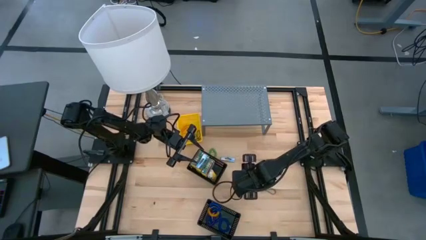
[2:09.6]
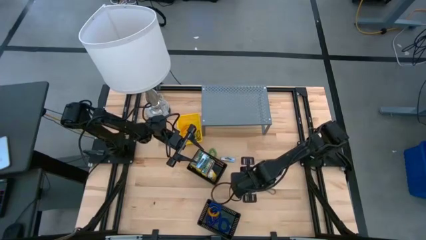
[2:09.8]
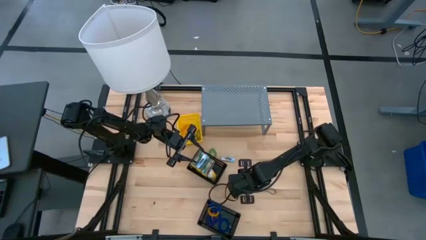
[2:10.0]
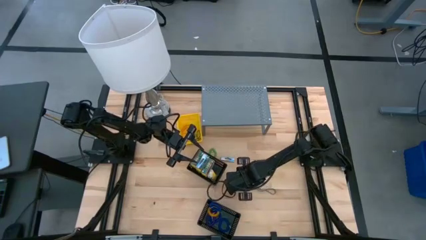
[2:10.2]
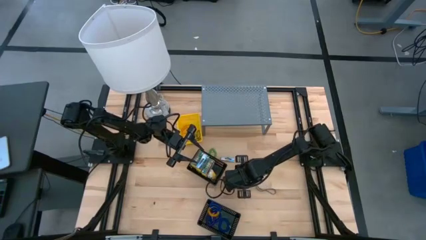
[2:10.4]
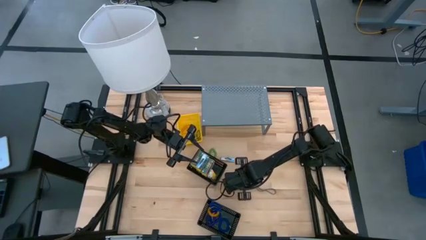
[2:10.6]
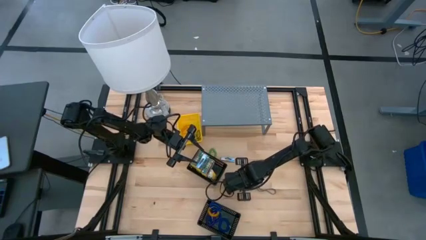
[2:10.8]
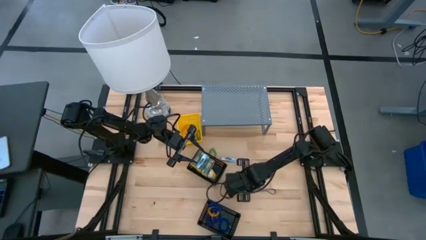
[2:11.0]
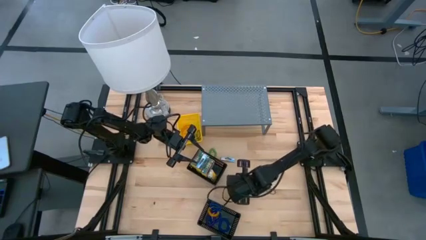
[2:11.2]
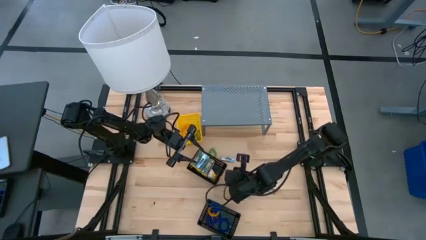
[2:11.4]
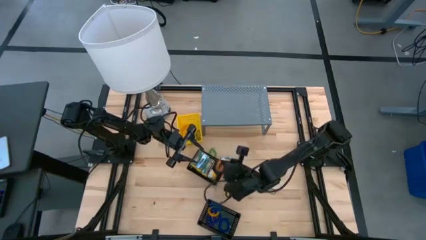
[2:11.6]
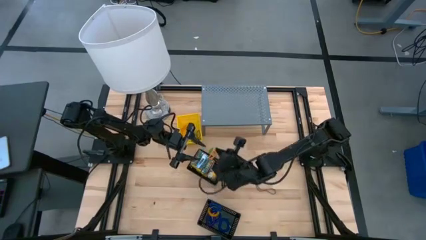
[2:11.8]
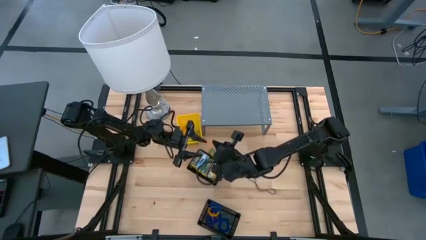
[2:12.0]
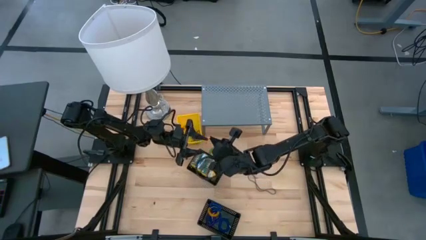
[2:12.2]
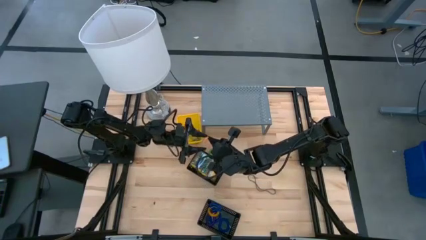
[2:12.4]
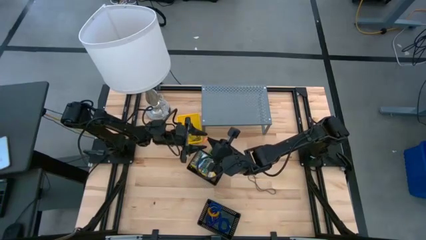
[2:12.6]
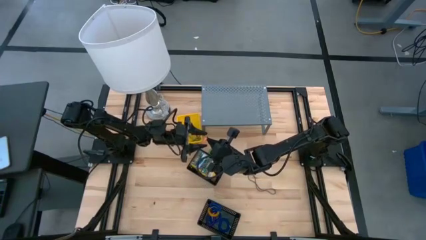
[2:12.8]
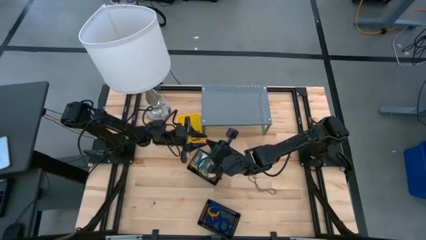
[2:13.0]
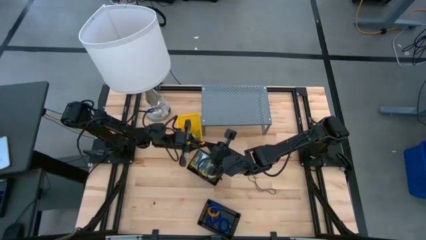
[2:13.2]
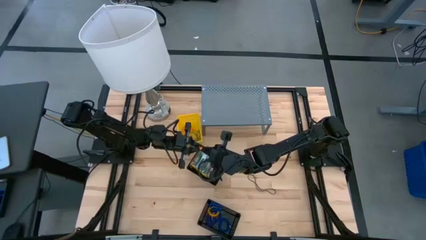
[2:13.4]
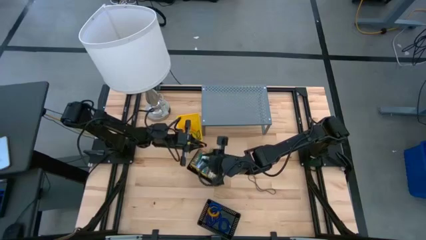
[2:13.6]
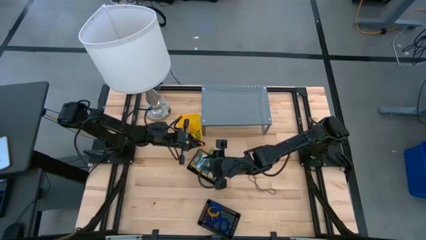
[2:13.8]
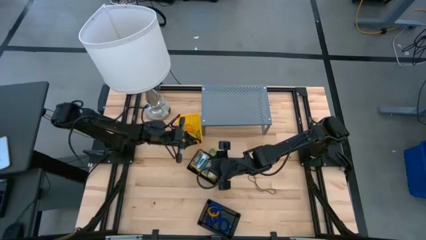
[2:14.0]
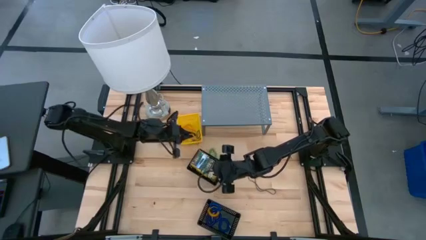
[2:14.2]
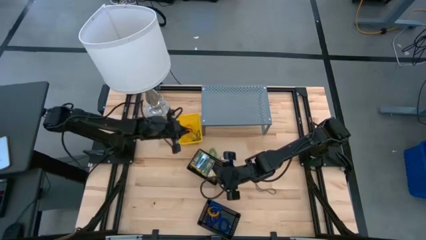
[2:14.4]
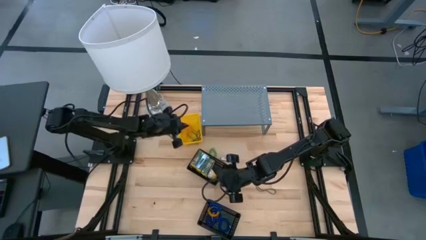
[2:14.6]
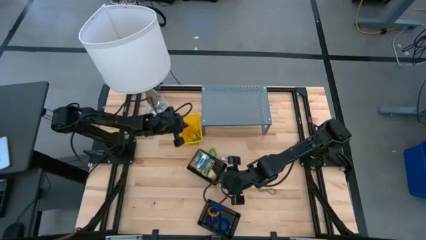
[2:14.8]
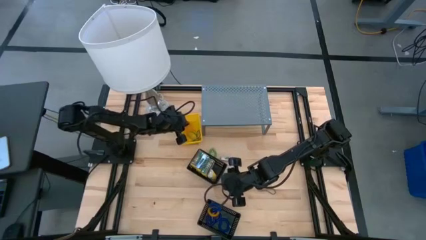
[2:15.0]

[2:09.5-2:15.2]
Task: Pick & Place Office Desk Supplies
Put the orange rubber band into the yellow bin

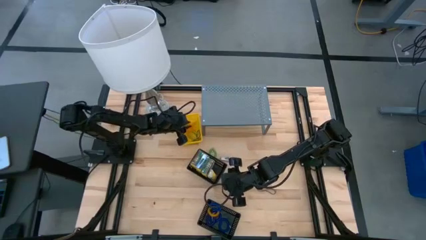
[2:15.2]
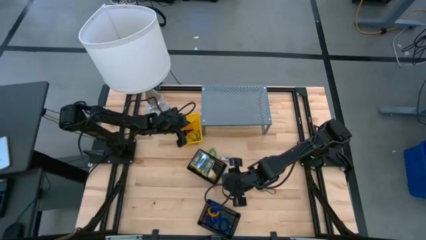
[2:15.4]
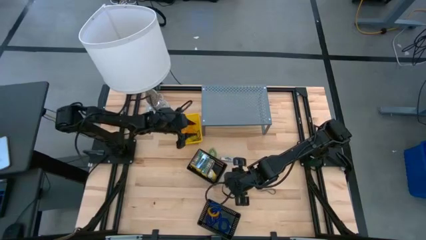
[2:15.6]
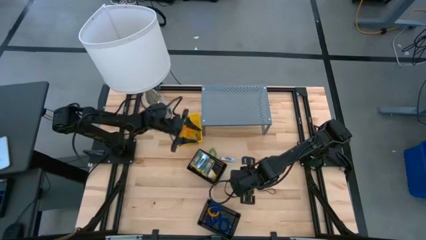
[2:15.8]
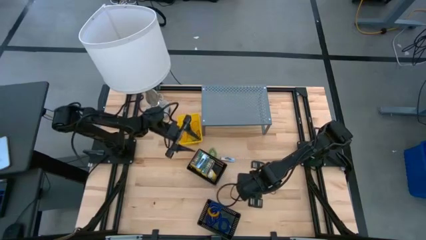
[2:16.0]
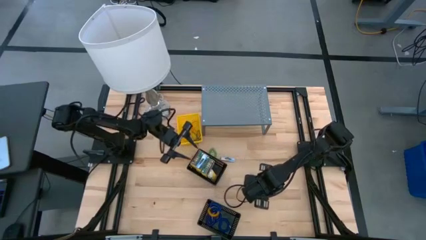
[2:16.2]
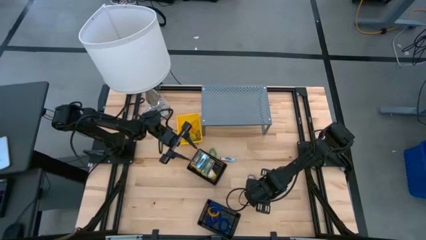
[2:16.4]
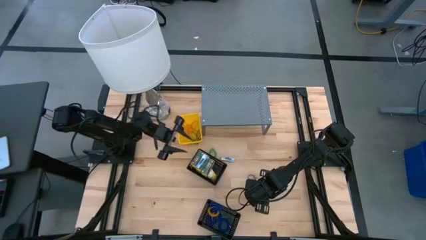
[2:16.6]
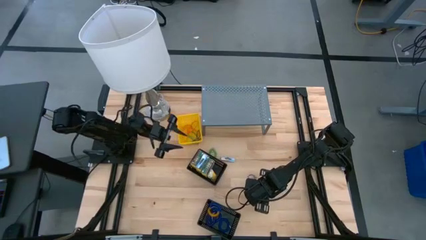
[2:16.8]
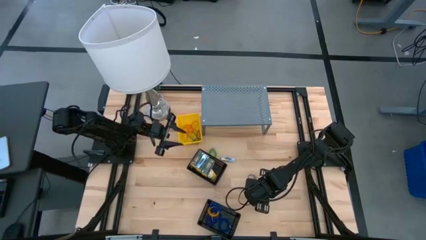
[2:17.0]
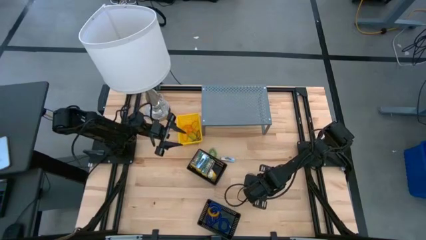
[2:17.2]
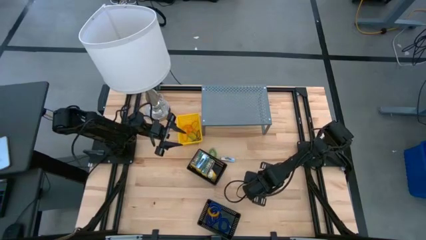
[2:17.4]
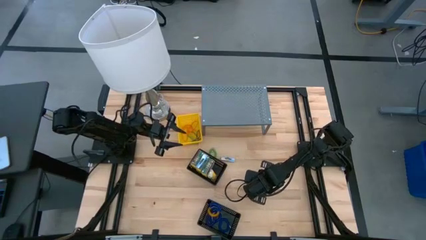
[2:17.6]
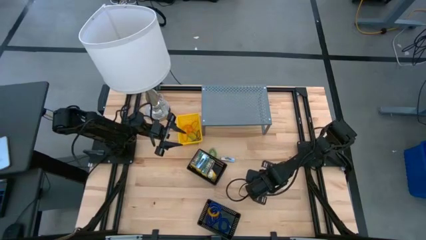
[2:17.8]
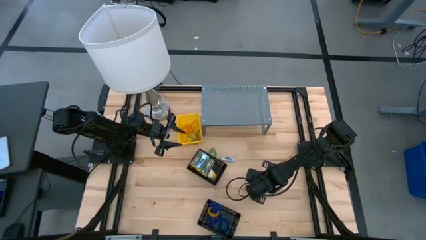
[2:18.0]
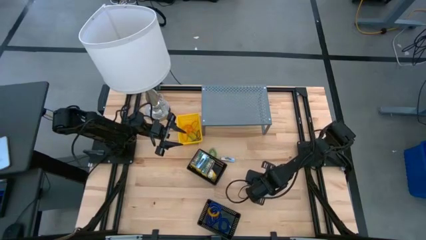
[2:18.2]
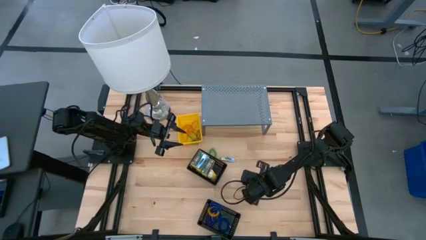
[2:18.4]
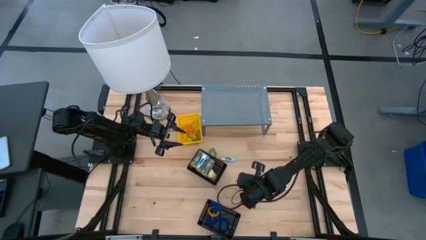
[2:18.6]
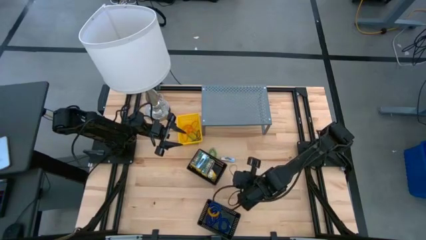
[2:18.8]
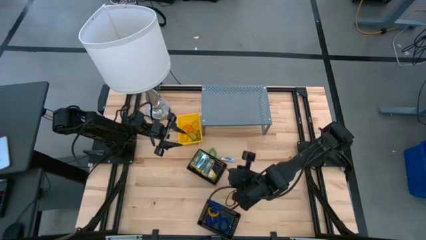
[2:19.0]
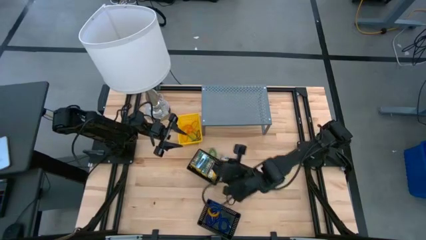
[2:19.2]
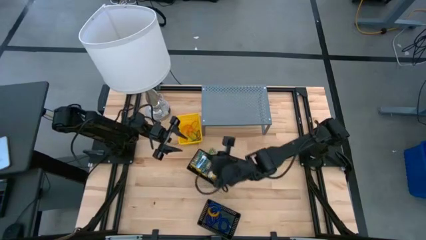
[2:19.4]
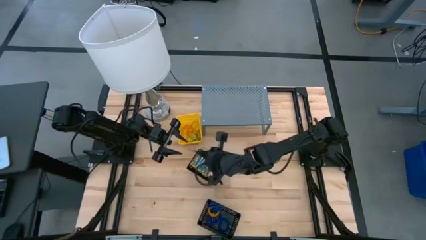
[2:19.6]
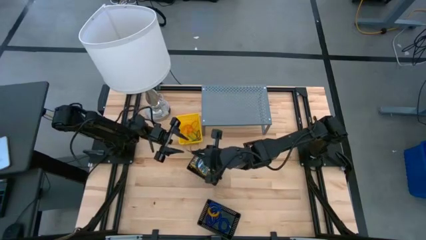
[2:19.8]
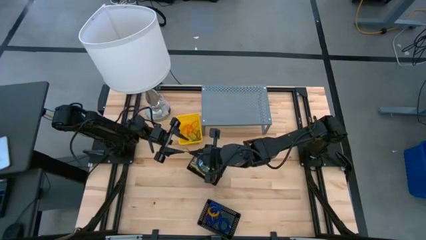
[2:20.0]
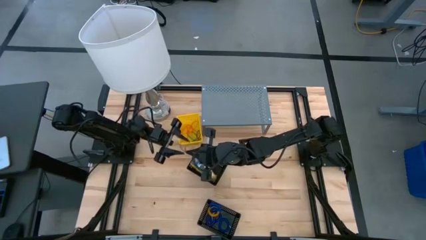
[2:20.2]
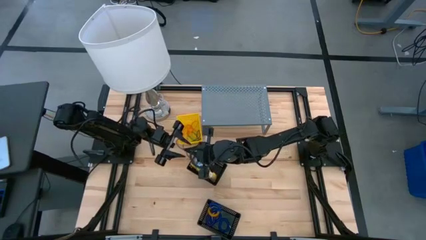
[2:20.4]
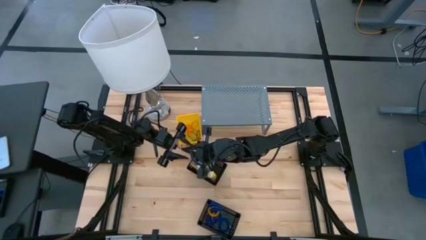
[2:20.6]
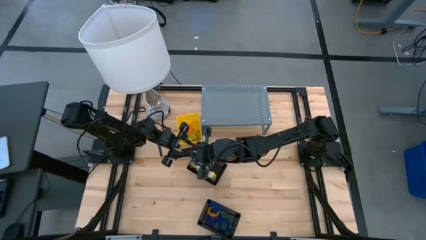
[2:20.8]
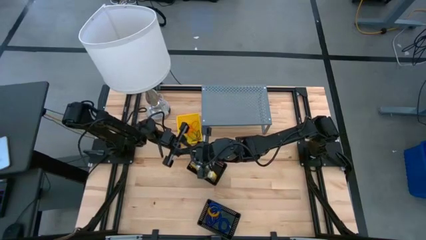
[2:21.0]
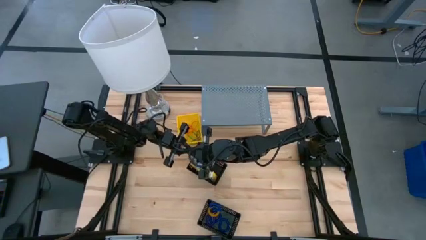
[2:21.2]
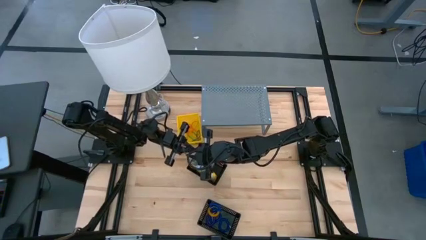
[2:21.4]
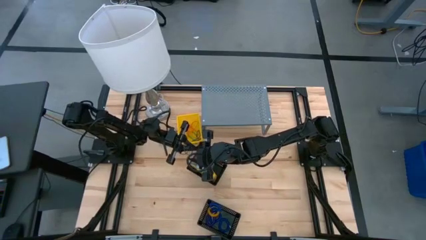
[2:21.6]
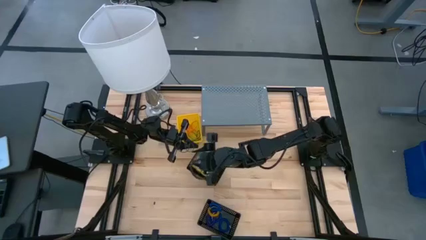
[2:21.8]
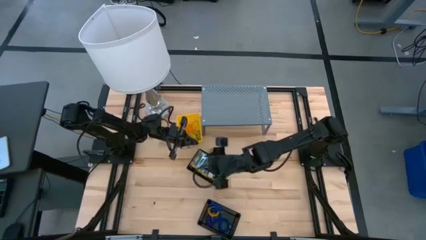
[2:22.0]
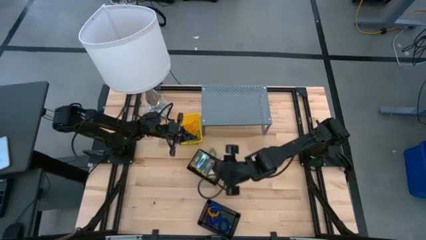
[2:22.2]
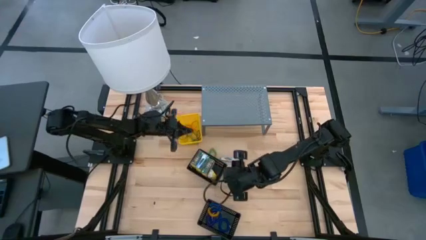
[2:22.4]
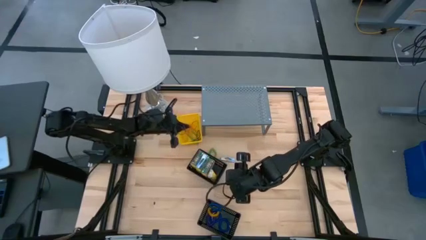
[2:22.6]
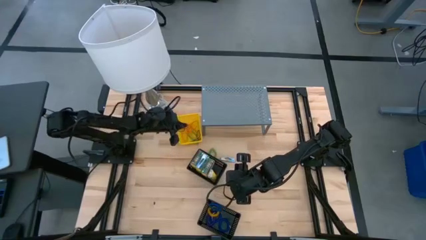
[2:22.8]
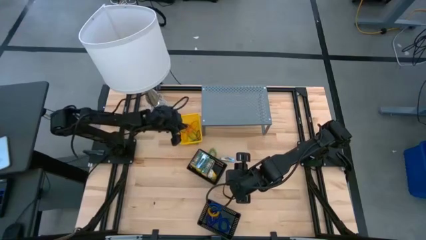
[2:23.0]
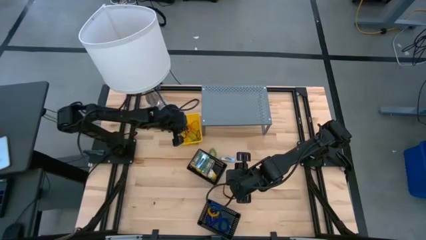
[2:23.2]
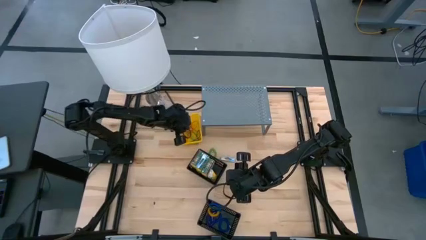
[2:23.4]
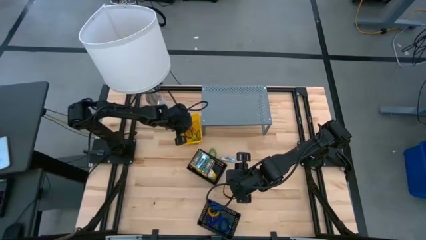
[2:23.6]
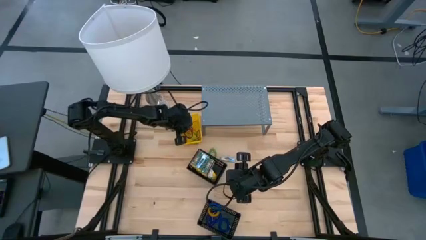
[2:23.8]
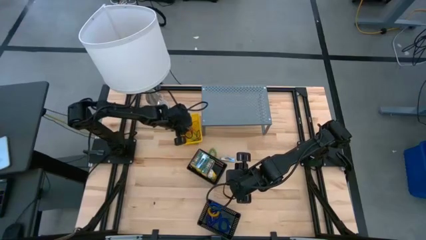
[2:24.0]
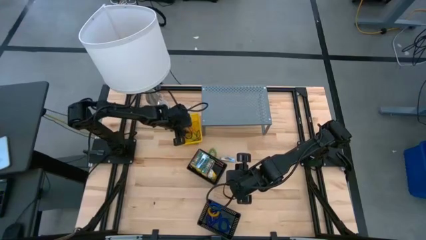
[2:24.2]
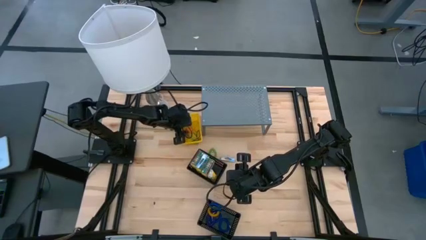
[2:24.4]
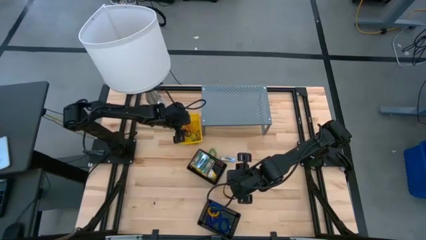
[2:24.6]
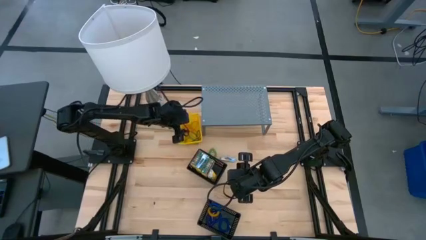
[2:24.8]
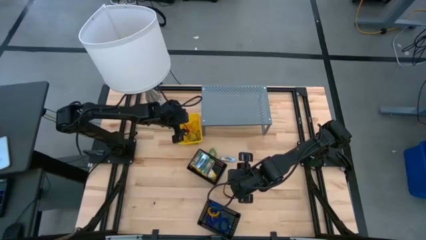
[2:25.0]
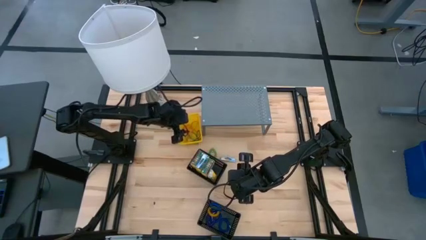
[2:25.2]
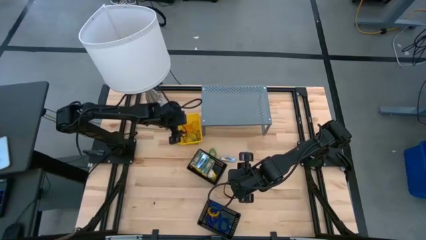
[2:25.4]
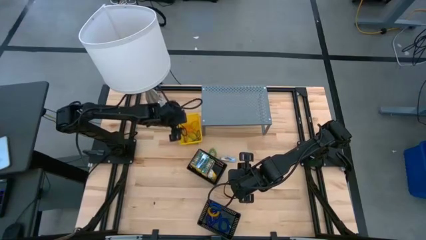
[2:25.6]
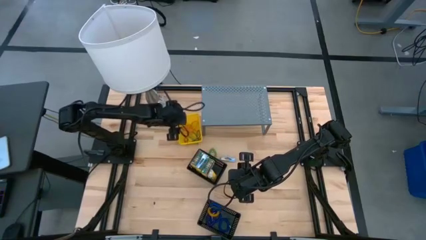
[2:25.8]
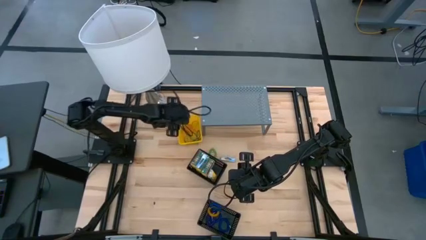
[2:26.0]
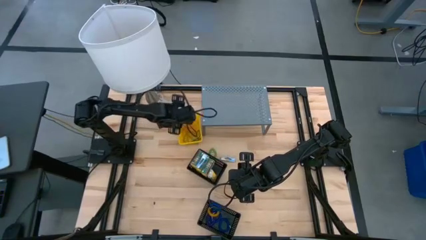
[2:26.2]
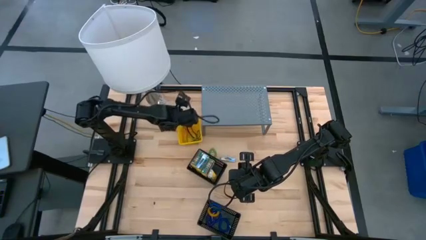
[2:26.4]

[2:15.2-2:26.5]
Put the black rubber band into the yellow bin

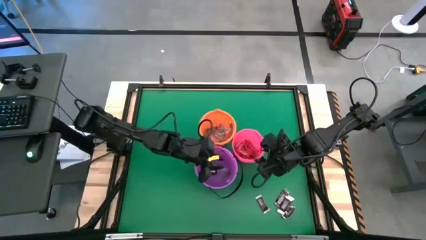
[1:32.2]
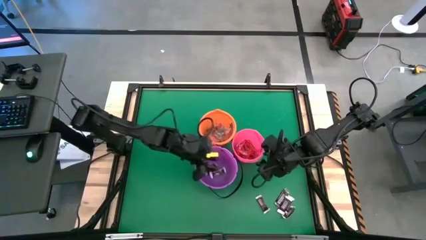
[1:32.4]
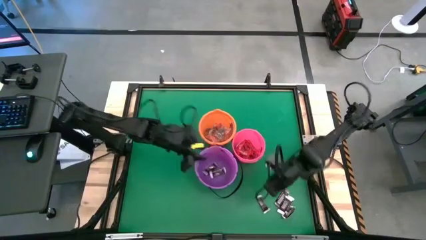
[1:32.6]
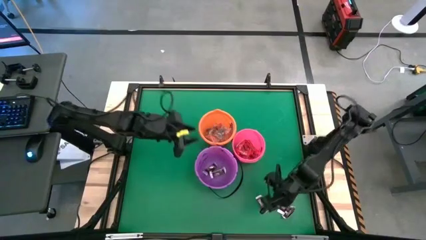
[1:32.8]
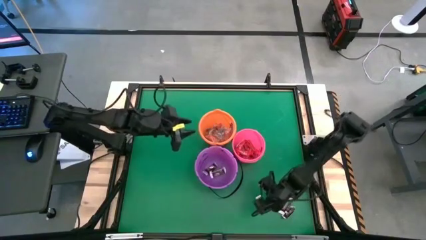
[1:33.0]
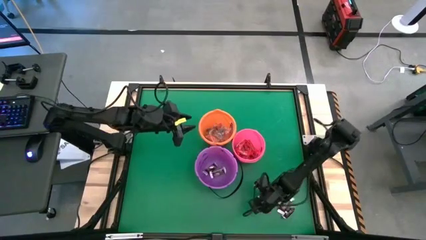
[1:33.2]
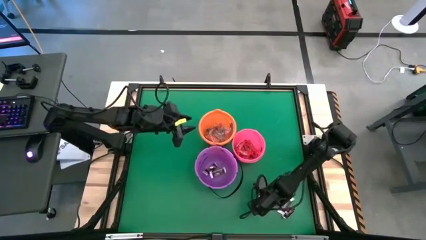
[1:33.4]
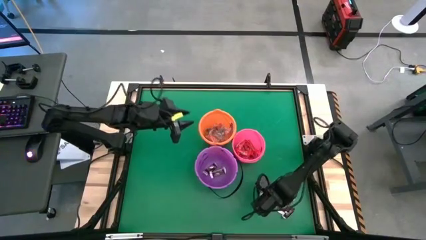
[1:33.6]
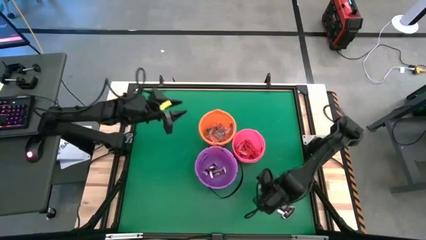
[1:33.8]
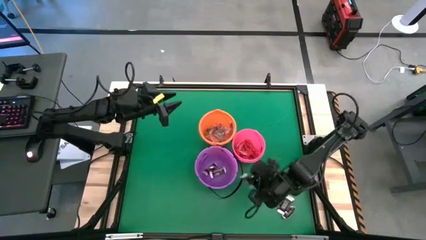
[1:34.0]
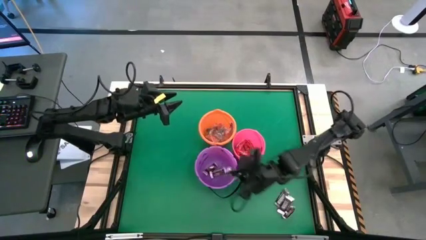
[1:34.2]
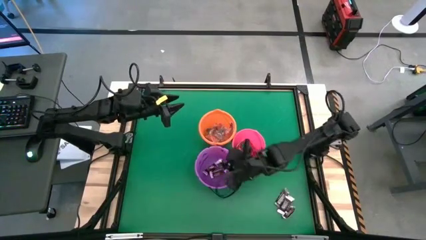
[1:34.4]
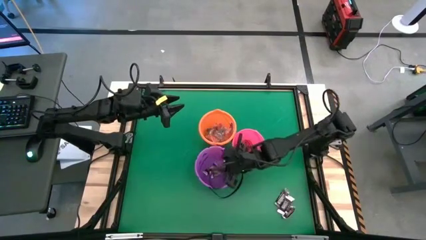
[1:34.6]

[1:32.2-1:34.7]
Task: Sort candy by brand, put in halloween buckets
Put the brown chocolate bar into the purple bucket
